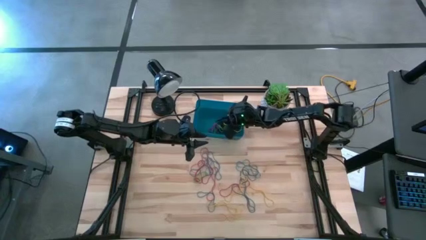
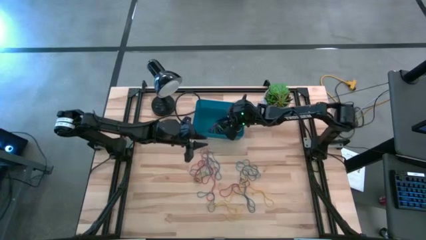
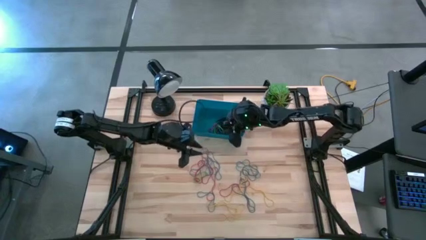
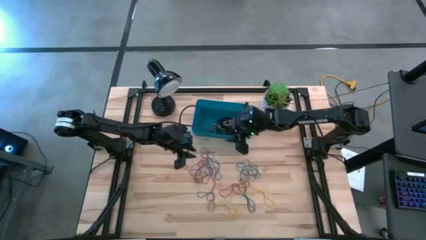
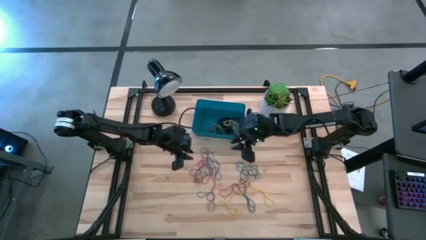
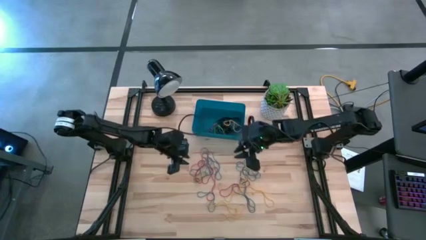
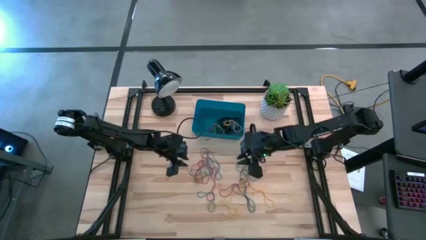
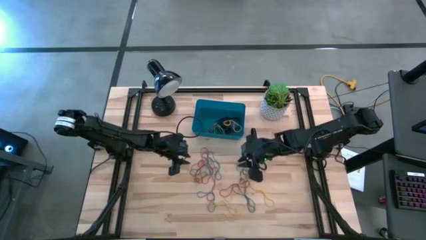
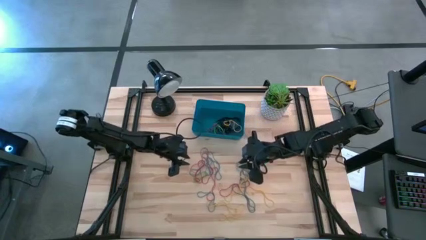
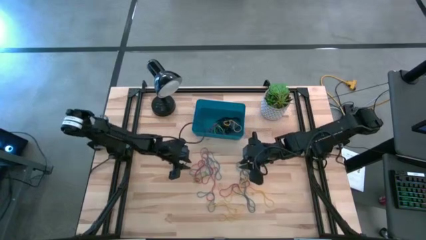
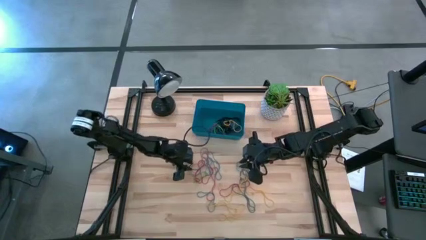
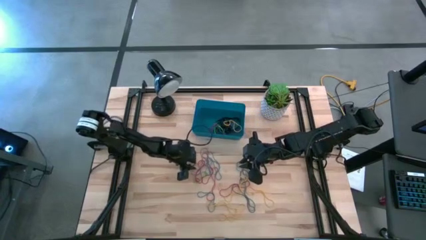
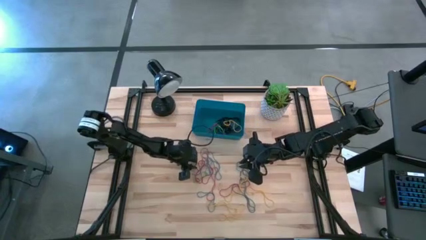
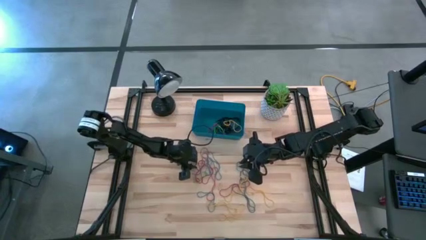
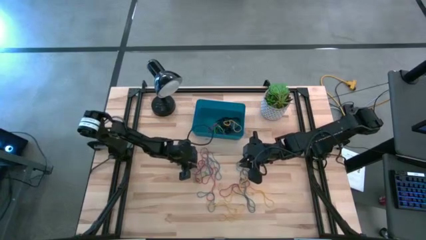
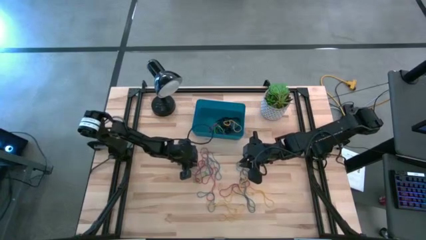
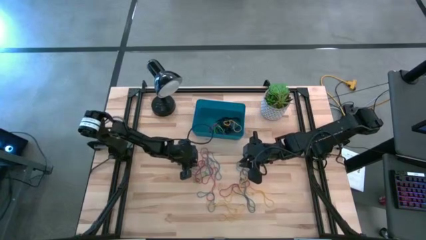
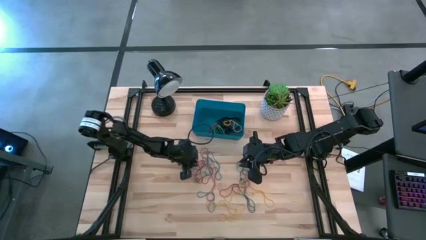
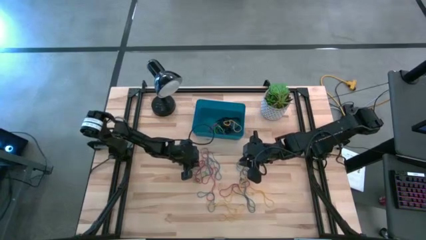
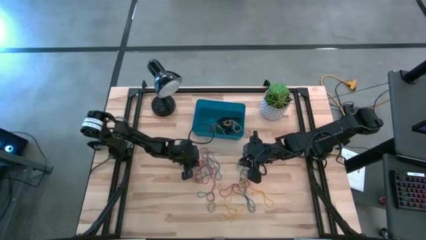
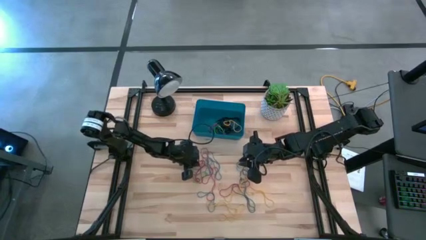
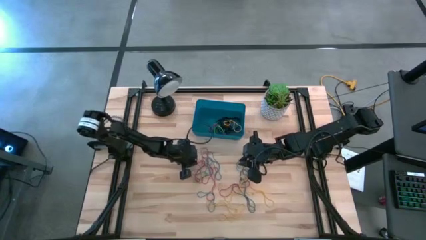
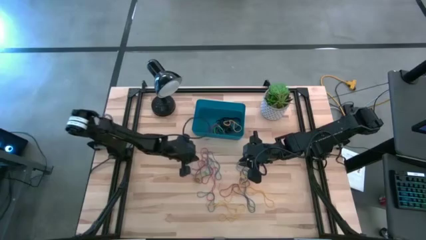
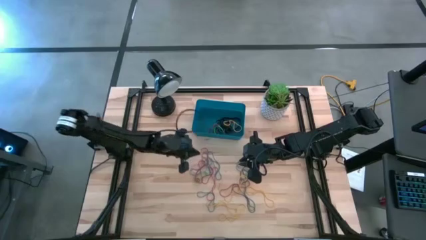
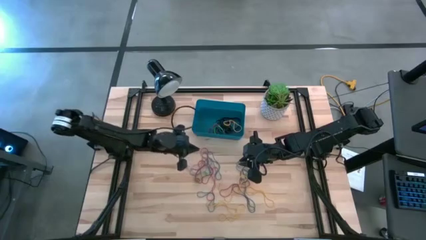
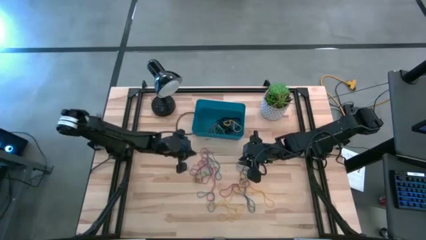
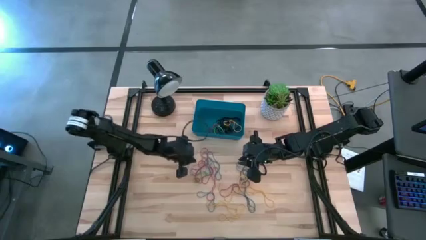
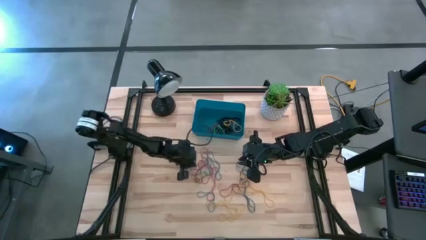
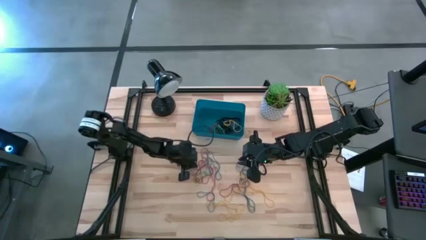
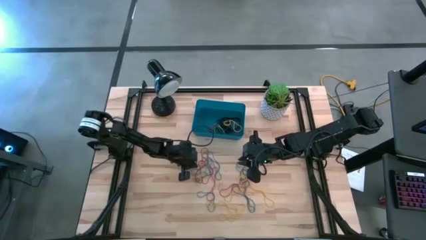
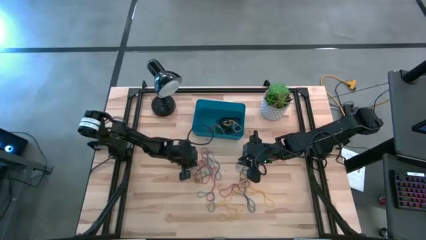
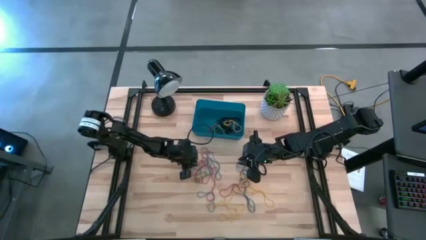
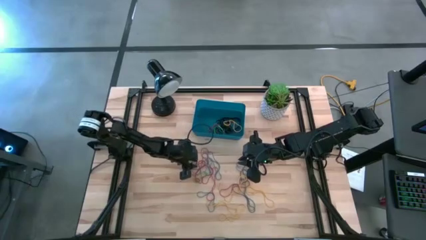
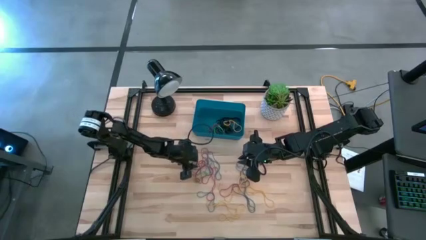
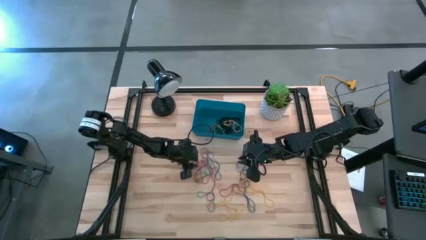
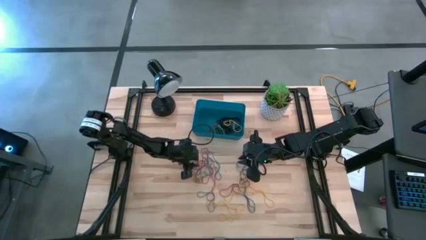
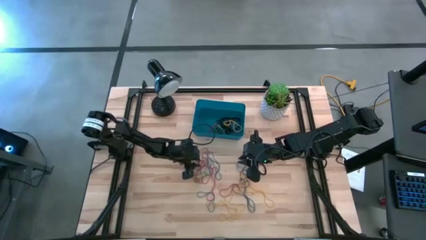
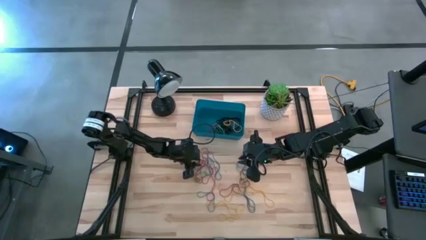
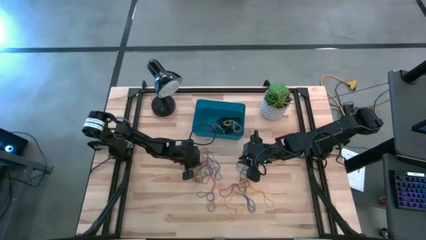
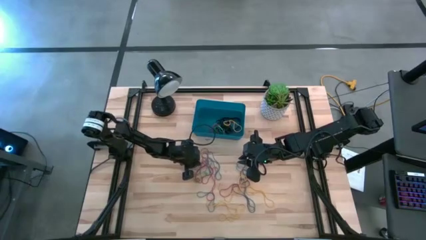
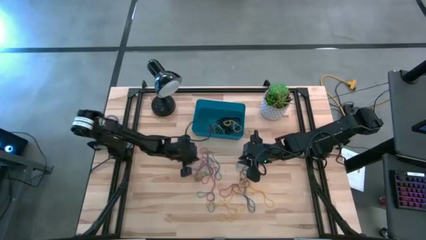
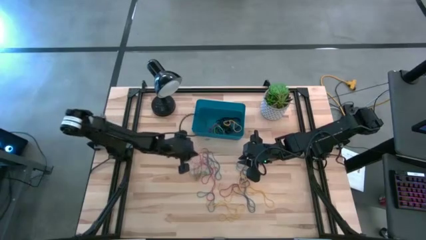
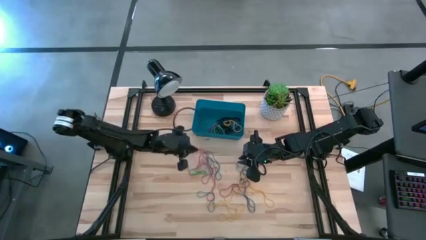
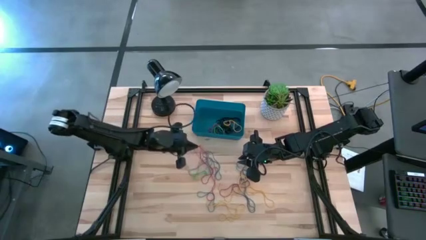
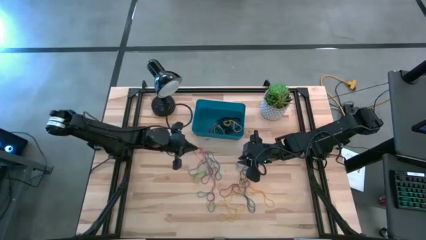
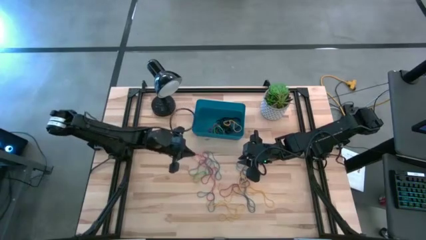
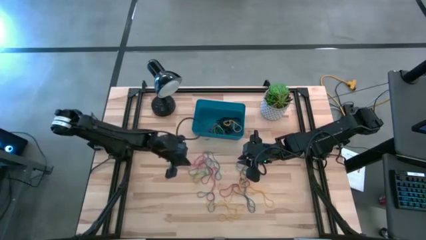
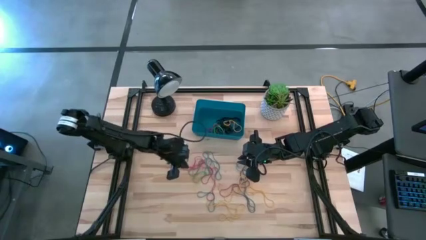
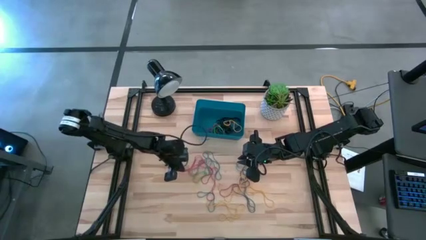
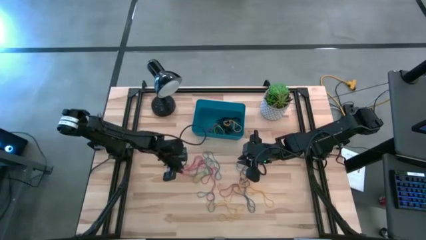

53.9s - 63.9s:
Task: Pick and place rubber bands into bin
Put the red rubber band into the blue bin

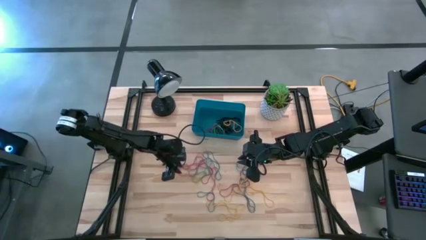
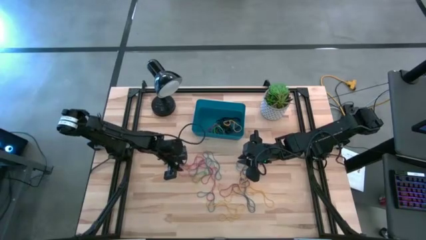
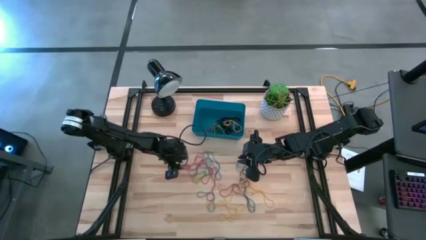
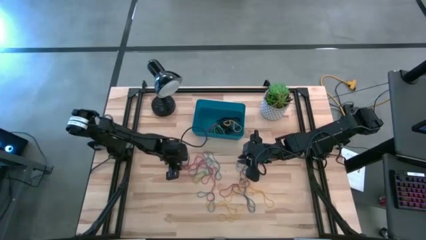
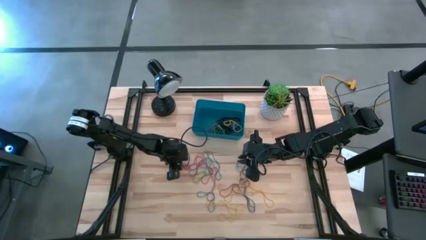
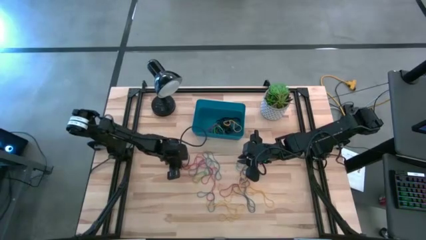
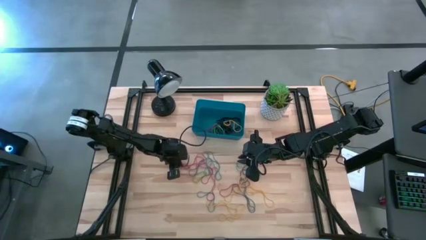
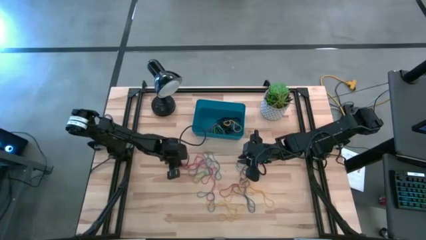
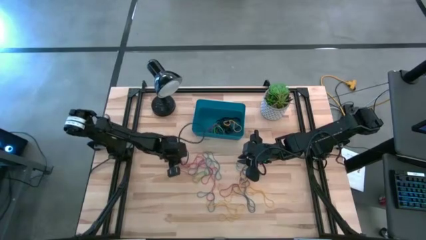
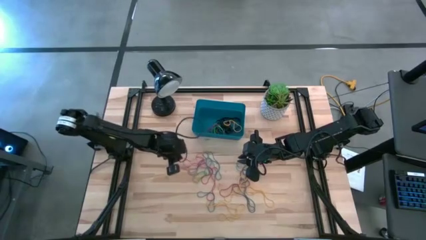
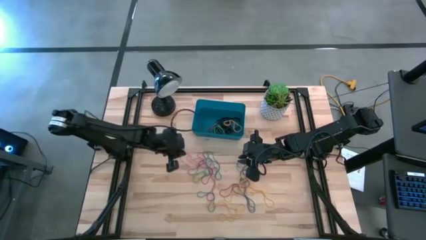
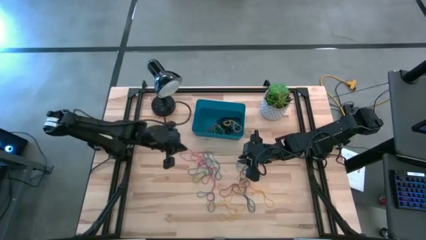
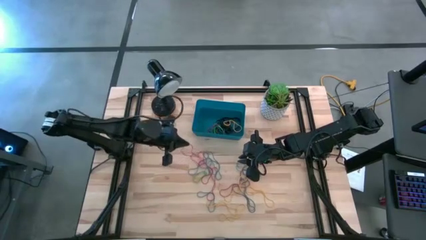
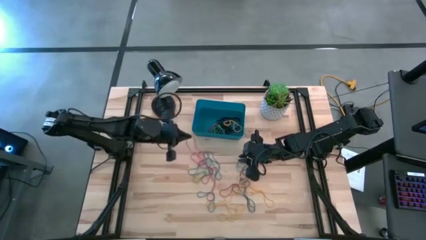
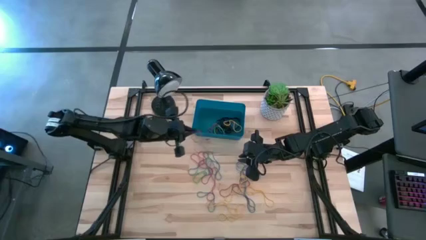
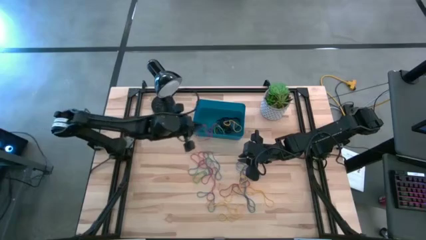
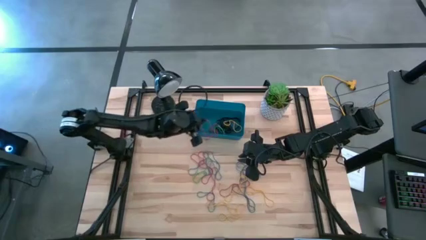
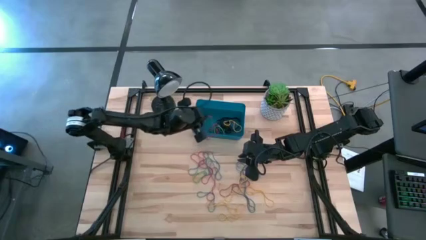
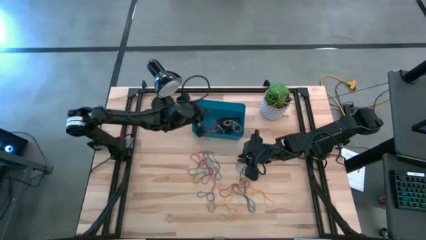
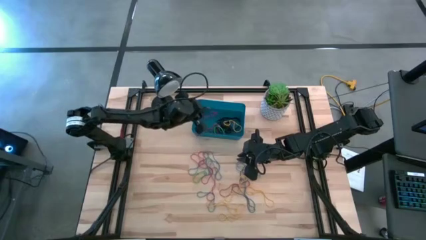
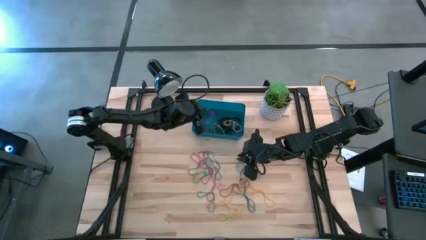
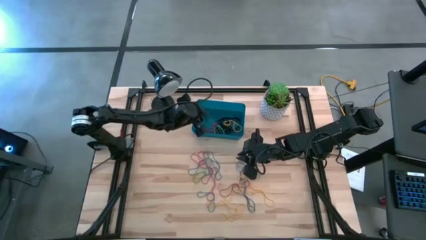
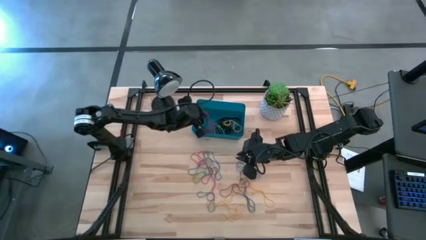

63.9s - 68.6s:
Put the red rubber band into the blue bin
